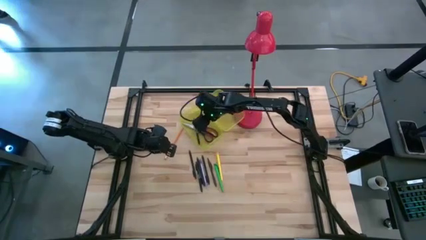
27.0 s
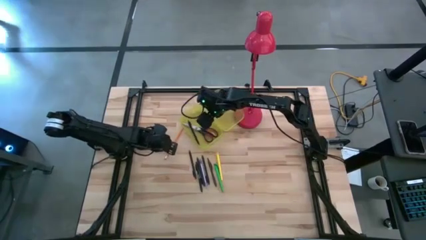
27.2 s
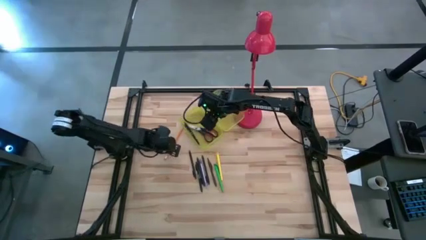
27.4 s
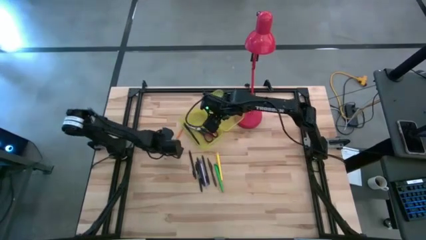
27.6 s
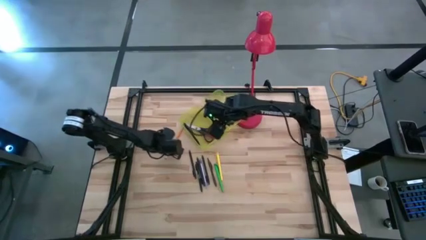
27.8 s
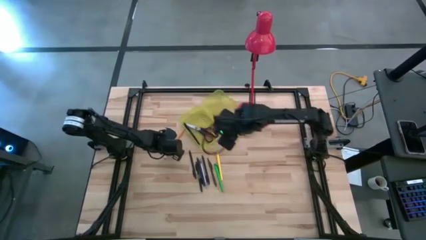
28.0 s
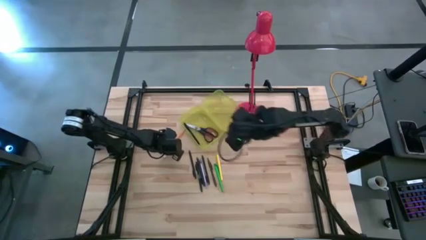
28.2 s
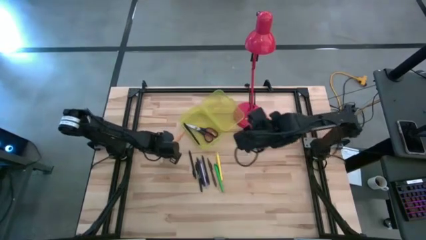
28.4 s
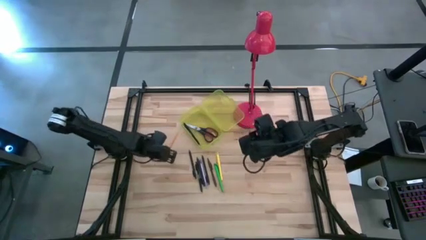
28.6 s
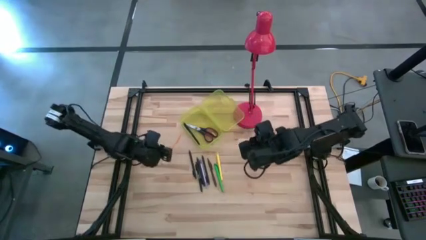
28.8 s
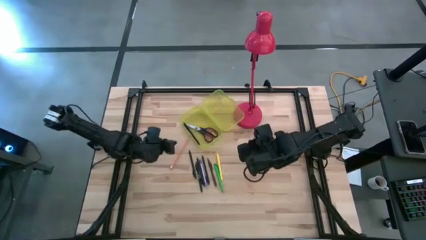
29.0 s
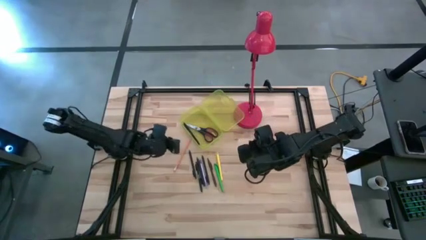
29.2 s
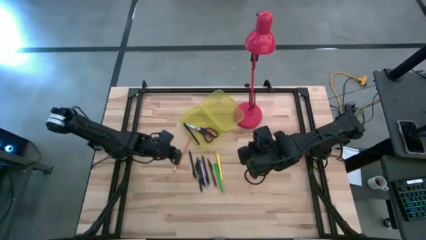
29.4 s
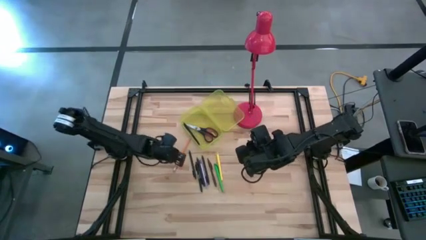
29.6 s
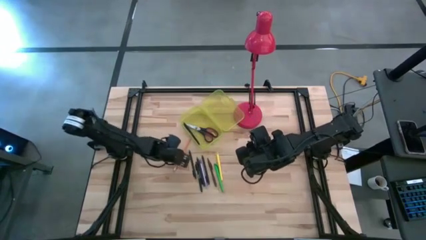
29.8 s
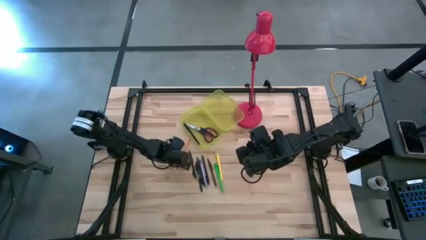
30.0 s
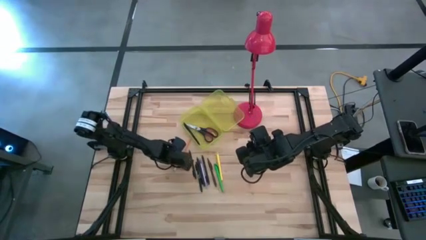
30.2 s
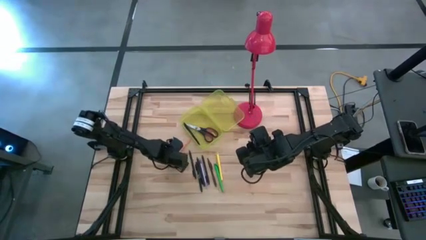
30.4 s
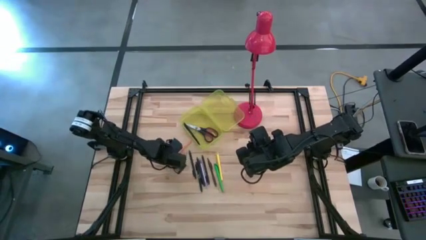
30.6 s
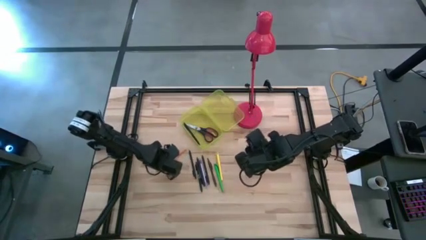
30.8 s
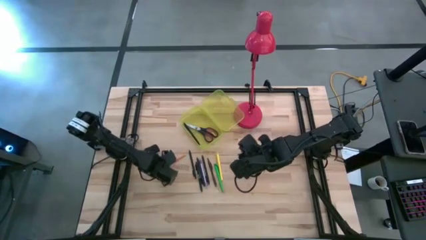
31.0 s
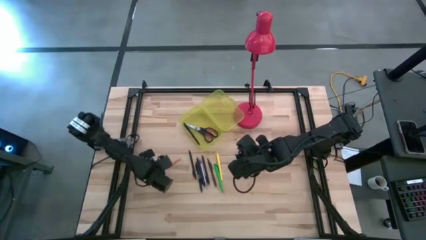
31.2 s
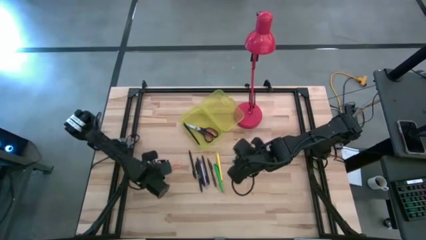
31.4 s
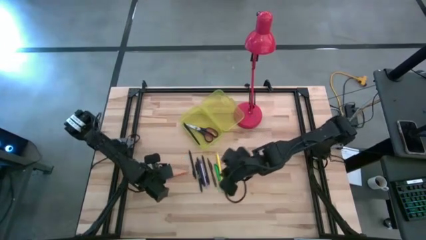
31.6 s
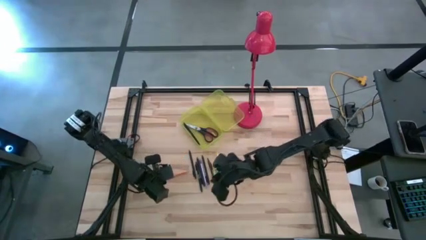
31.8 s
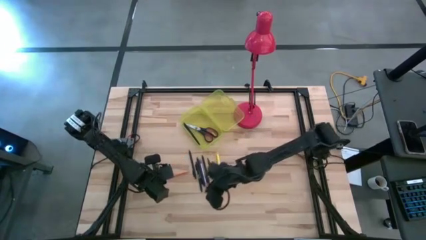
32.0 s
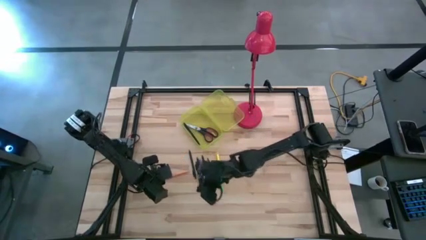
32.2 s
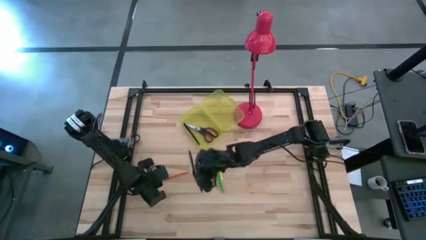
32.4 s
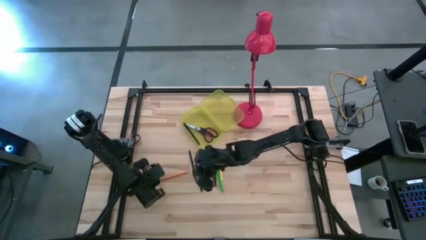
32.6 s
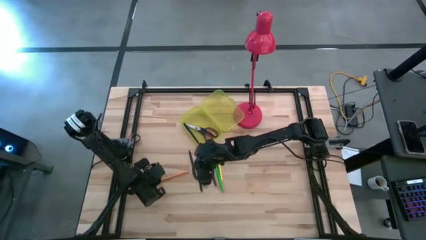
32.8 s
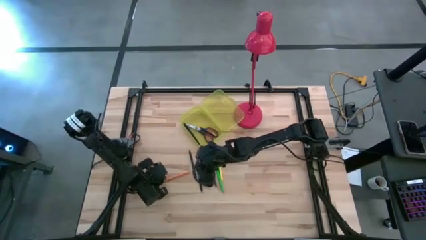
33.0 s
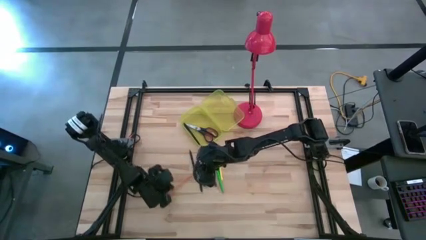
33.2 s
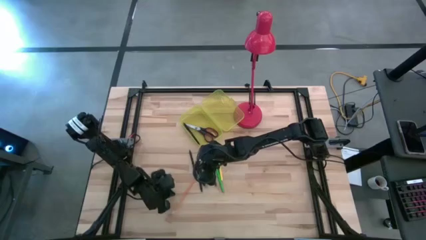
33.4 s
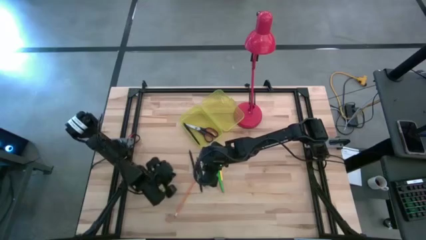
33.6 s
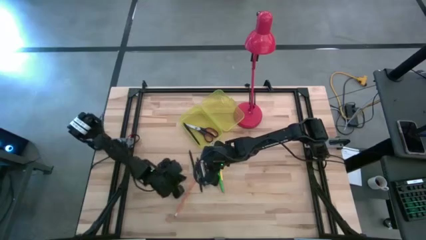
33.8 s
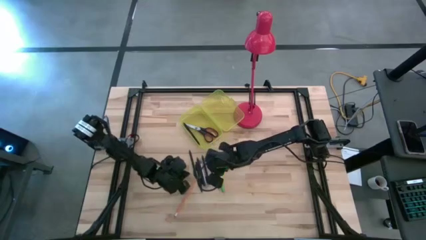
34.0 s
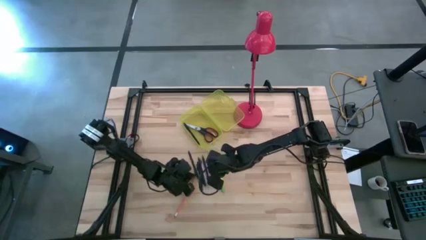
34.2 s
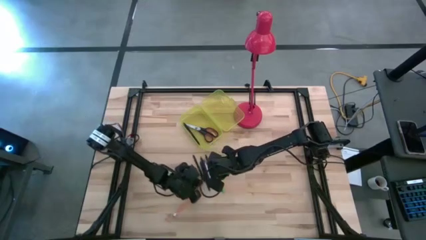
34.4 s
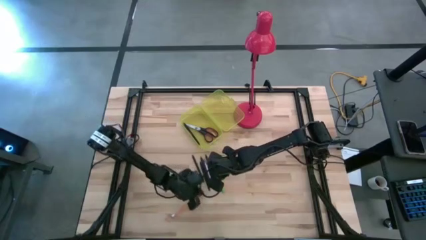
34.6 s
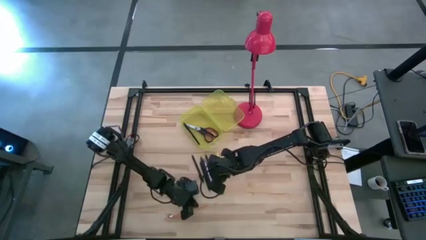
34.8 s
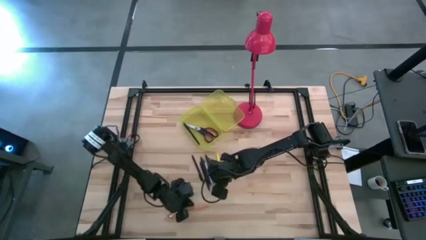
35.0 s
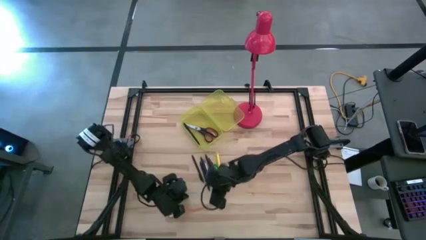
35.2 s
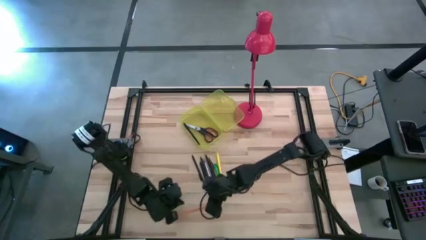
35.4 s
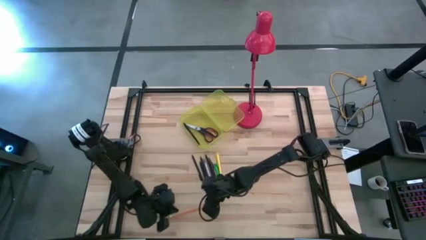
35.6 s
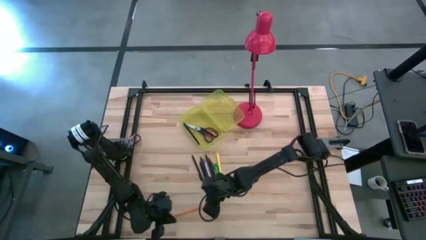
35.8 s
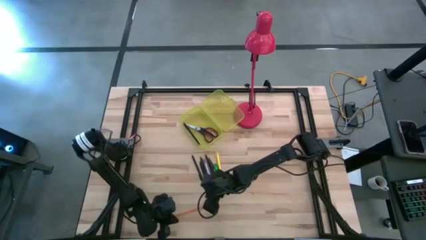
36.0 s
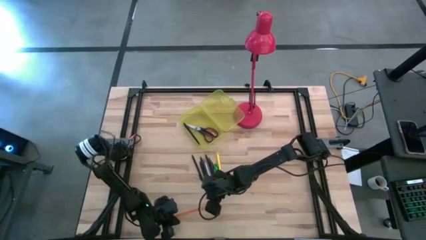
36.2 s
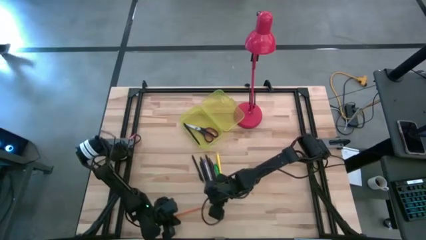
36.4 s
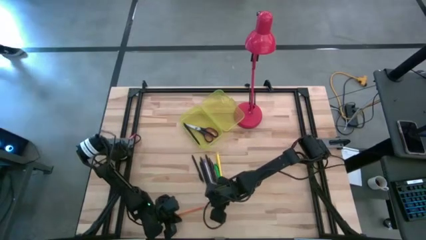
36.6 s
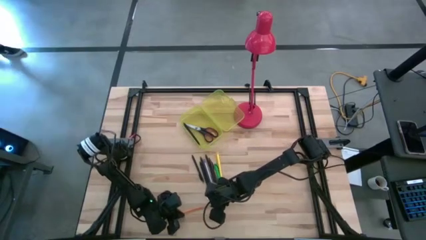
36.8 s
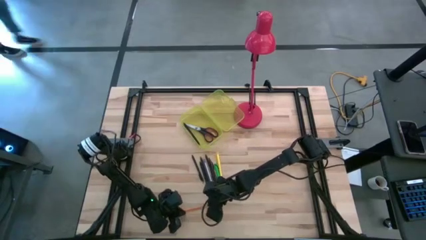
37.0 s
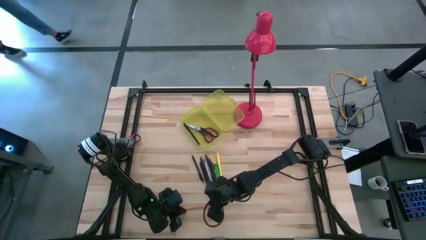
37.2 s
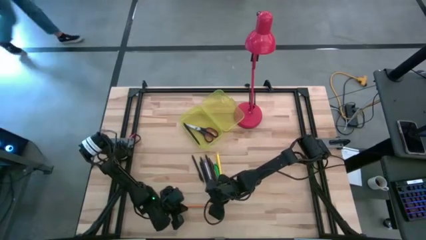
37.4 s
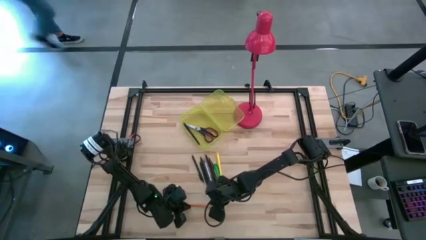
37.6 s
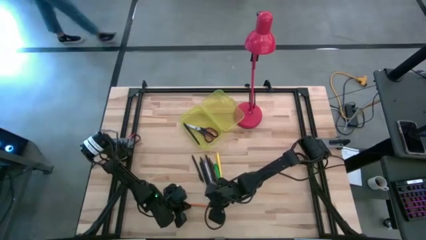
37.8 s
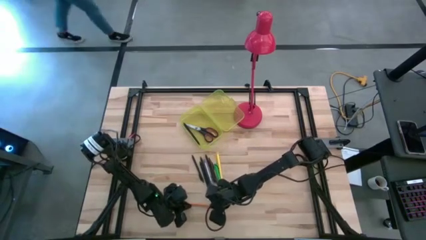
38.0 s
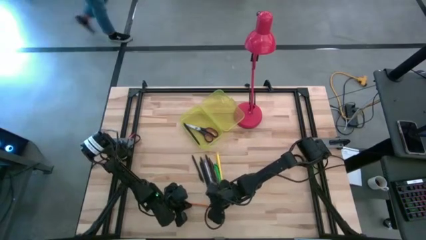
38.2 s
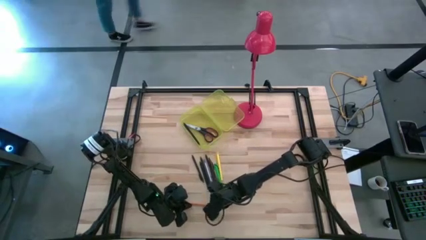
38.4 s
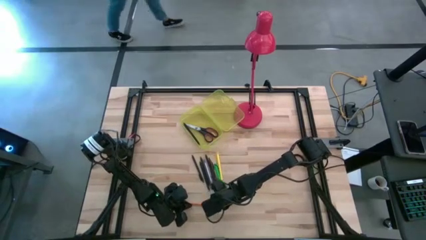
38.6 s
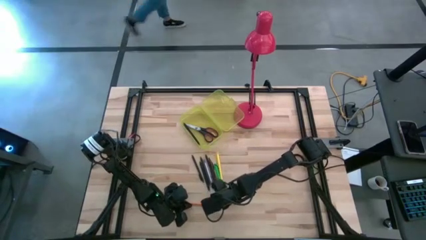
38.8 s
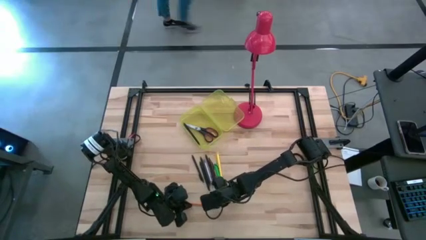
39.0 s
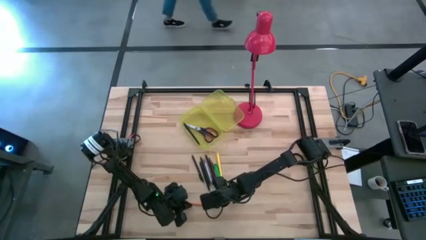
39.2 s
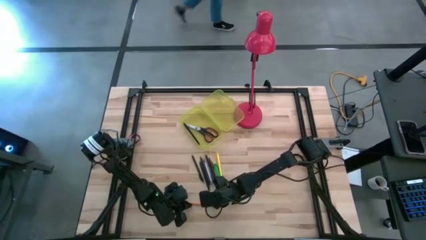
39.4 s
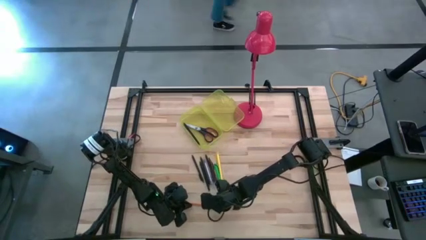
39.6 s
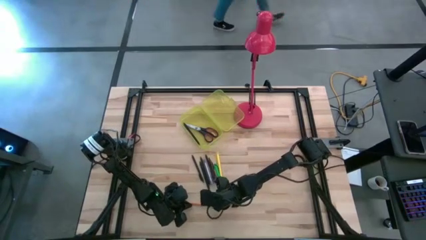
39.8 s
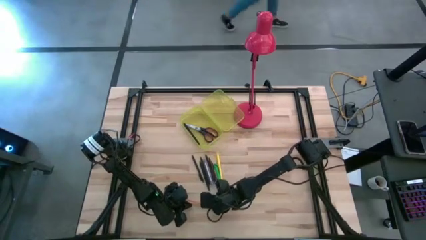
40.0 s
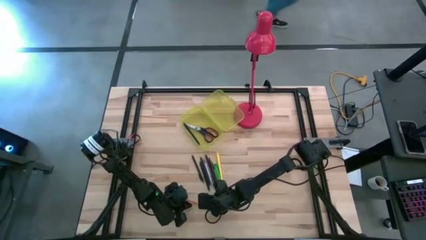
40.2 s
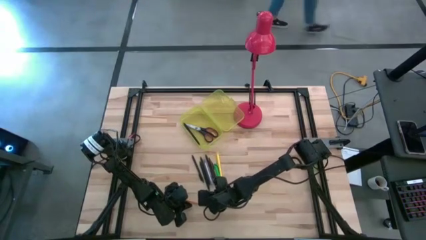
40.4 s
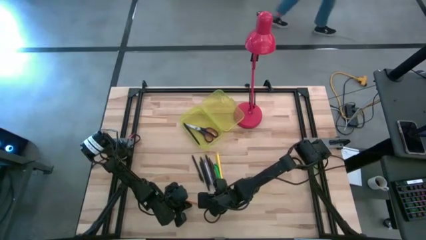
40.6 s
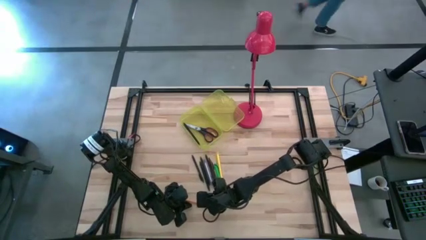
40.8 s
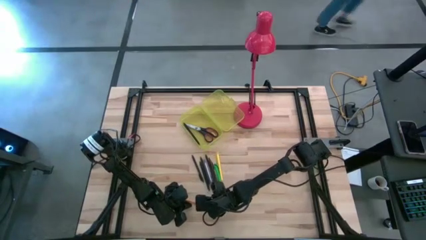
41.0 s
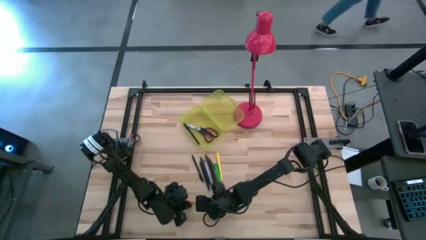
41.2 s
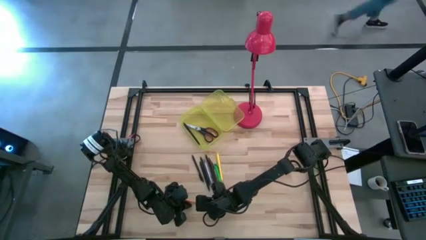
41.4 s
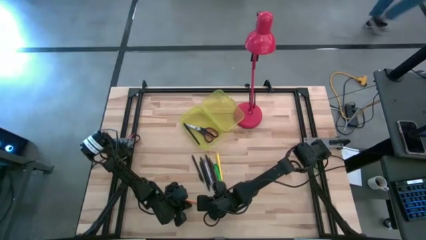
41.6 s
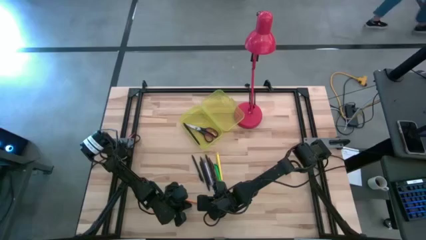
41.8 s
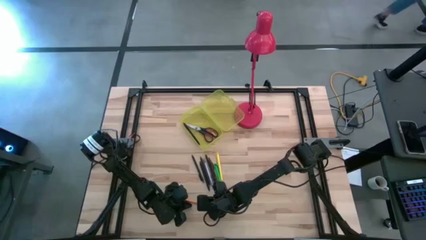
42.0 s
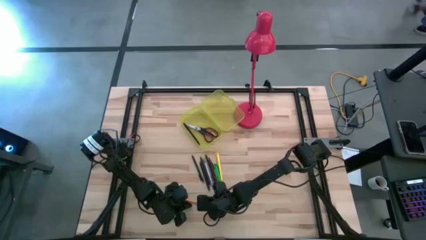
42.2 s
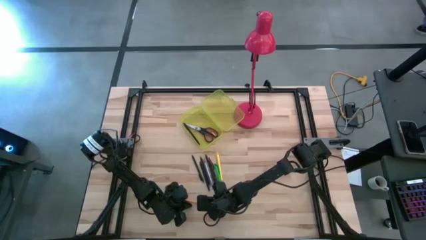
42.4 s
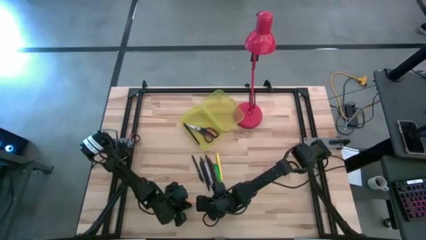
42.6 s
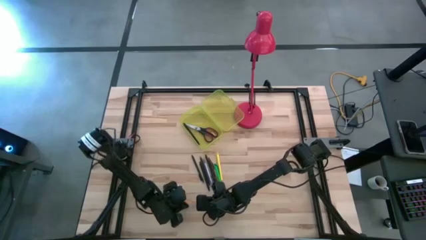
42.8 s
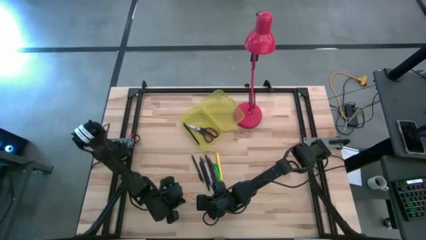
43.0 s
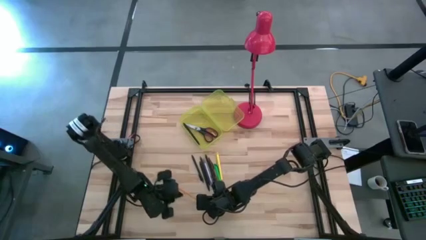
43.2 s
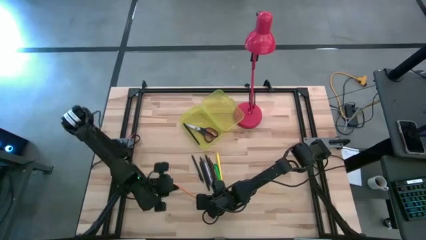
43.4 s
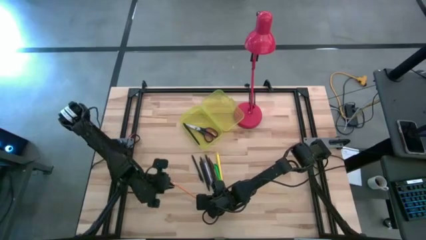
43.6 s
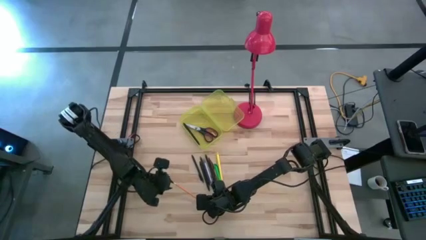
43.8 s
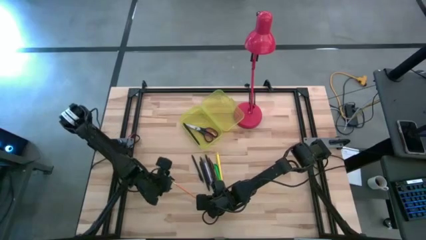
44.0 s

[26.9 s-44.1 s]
Task: Pick & place school supplies into a supply box
Put the orange pencil into the yellow supply box
